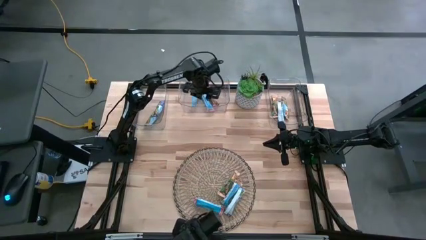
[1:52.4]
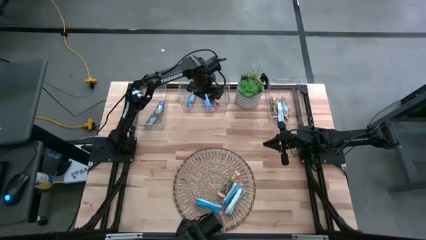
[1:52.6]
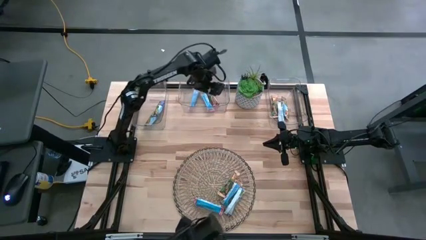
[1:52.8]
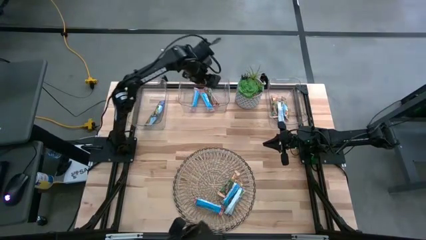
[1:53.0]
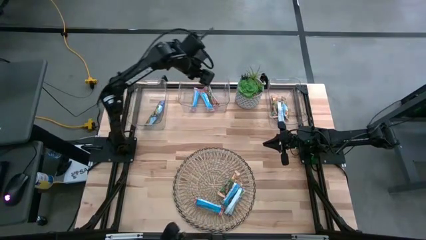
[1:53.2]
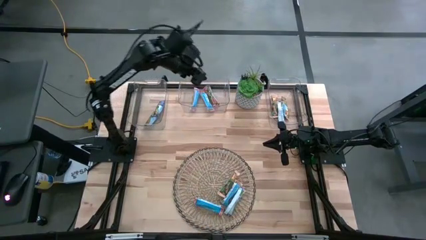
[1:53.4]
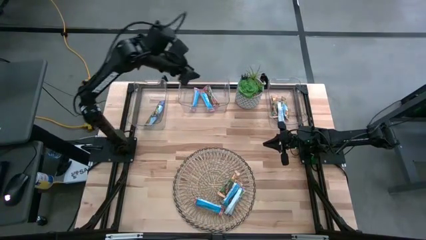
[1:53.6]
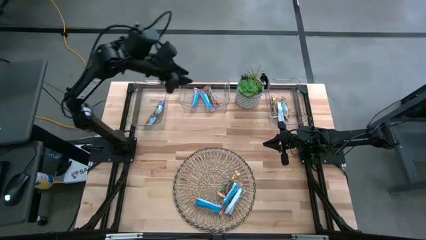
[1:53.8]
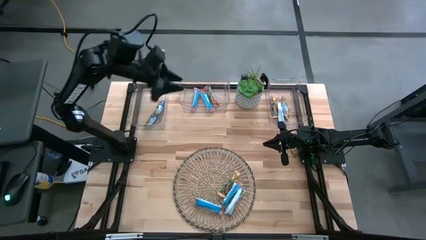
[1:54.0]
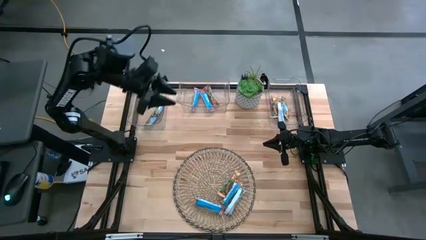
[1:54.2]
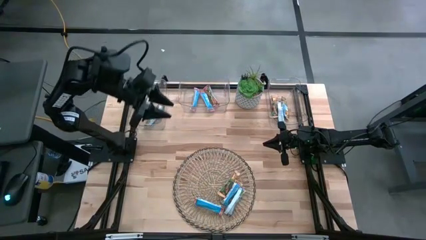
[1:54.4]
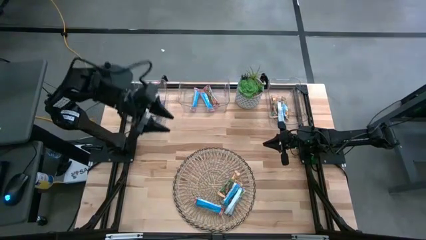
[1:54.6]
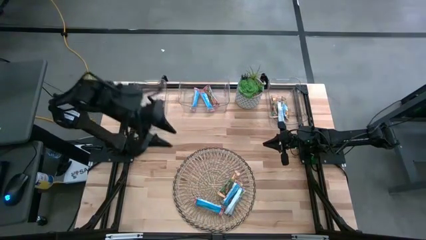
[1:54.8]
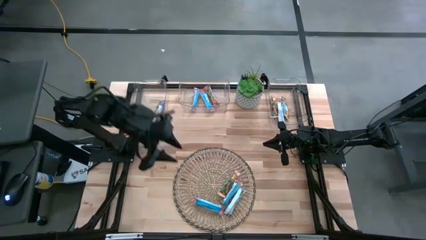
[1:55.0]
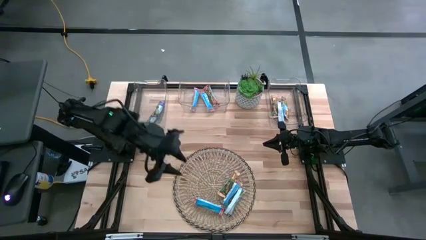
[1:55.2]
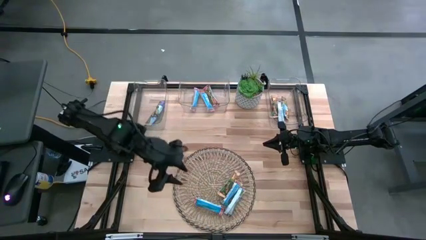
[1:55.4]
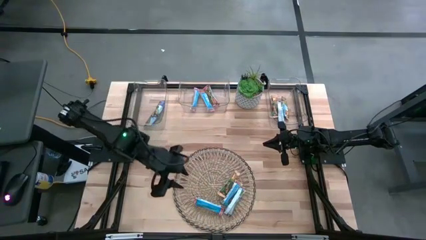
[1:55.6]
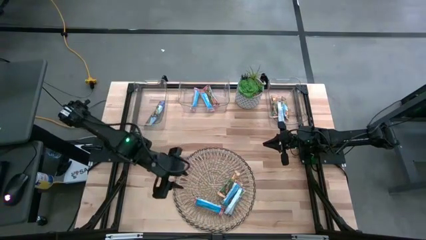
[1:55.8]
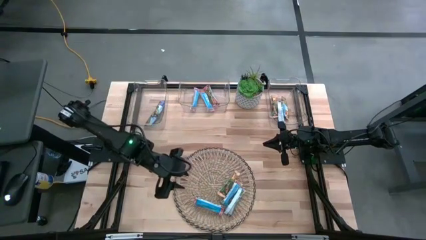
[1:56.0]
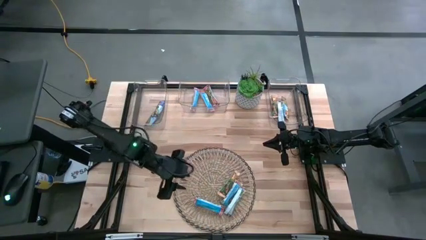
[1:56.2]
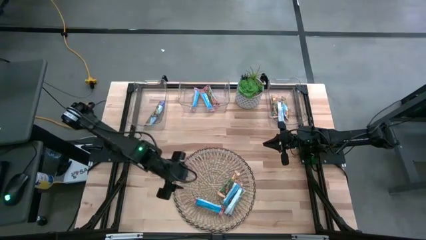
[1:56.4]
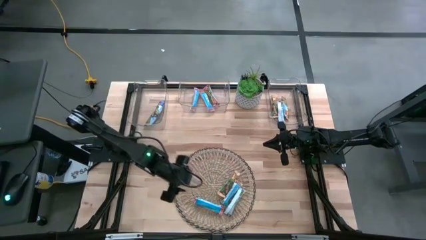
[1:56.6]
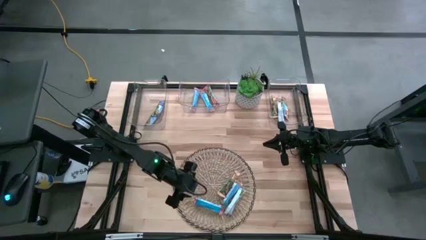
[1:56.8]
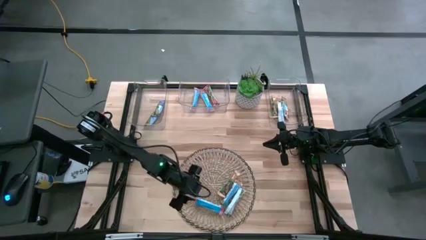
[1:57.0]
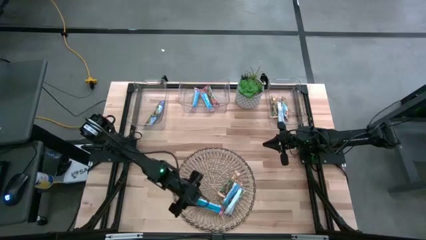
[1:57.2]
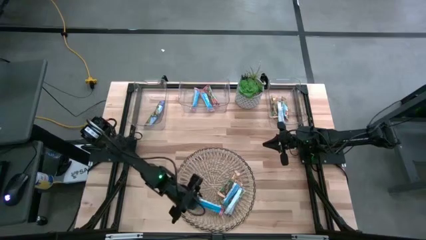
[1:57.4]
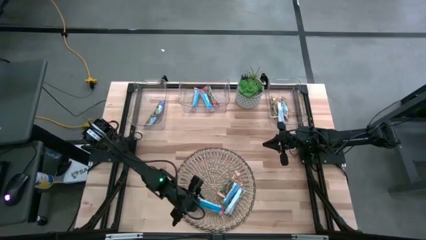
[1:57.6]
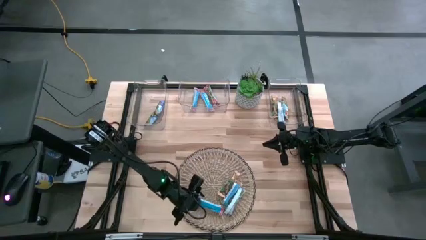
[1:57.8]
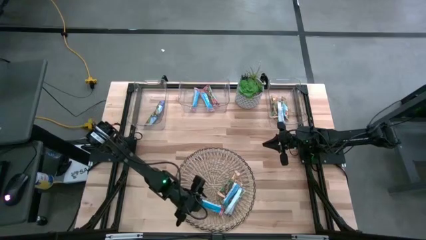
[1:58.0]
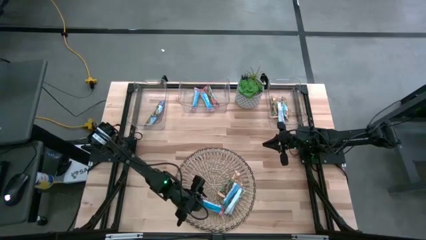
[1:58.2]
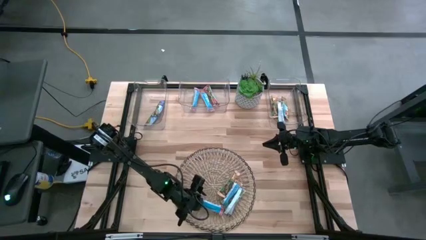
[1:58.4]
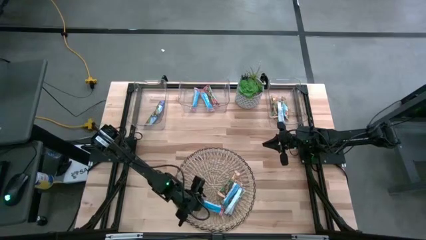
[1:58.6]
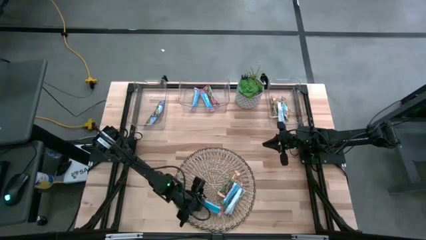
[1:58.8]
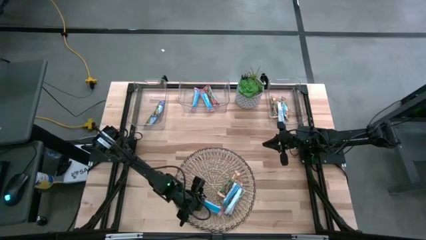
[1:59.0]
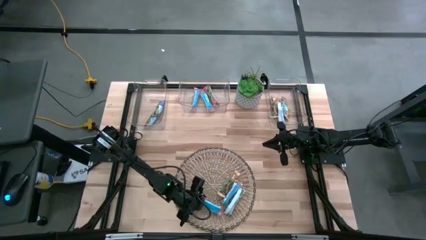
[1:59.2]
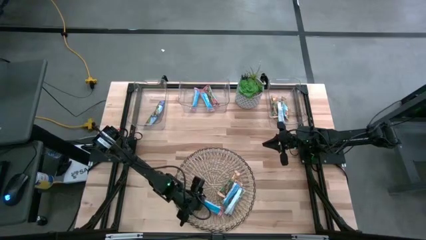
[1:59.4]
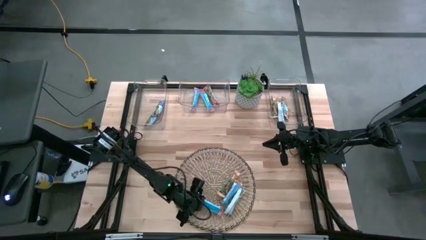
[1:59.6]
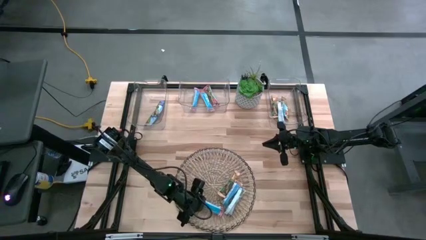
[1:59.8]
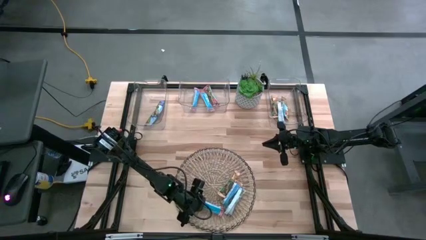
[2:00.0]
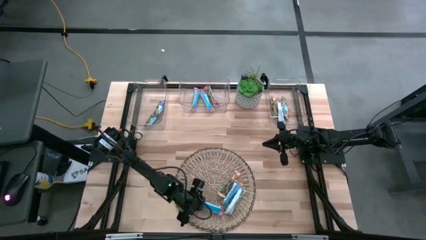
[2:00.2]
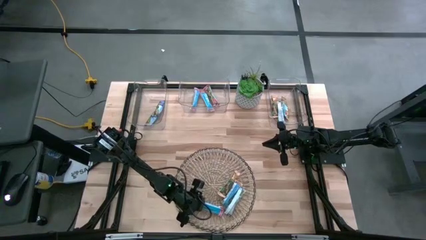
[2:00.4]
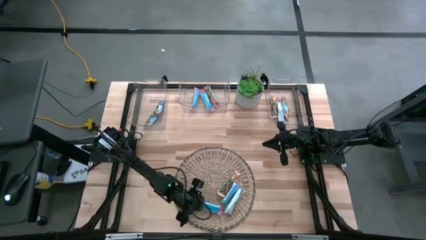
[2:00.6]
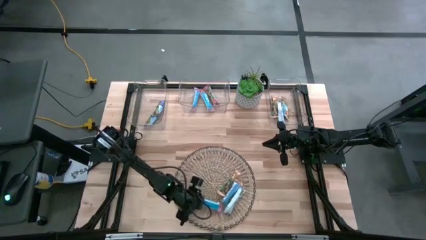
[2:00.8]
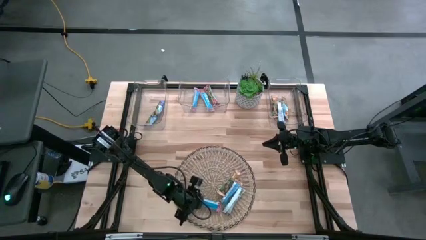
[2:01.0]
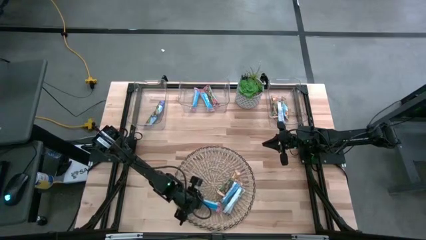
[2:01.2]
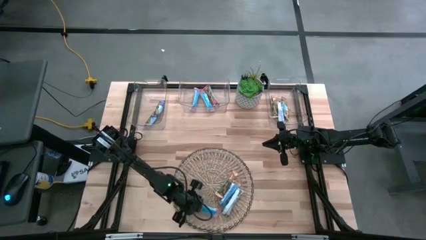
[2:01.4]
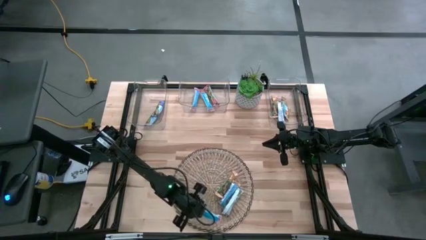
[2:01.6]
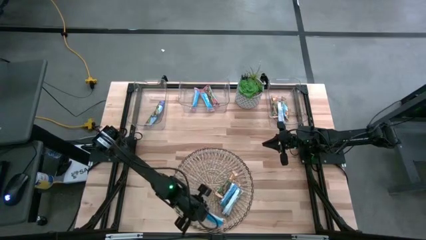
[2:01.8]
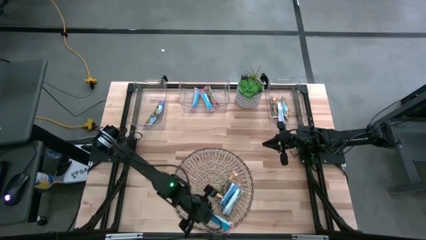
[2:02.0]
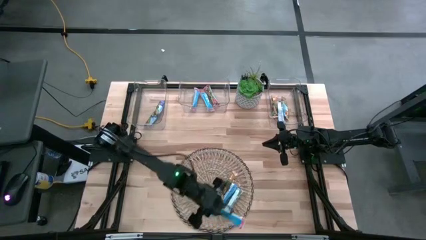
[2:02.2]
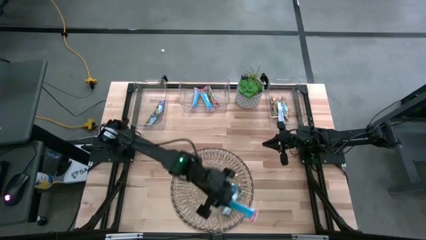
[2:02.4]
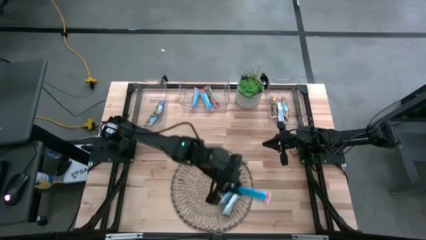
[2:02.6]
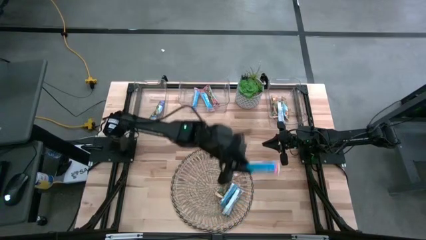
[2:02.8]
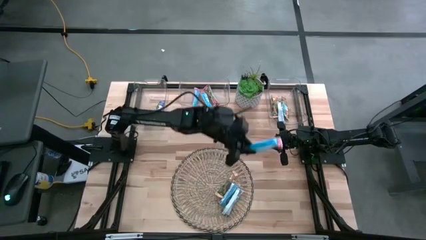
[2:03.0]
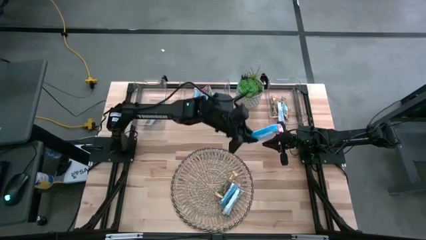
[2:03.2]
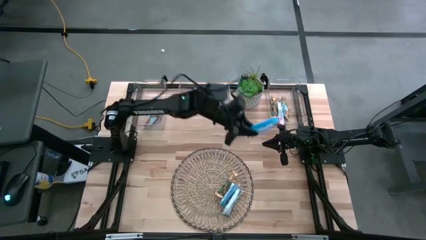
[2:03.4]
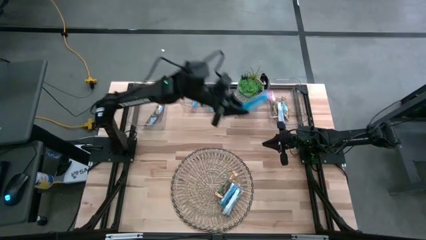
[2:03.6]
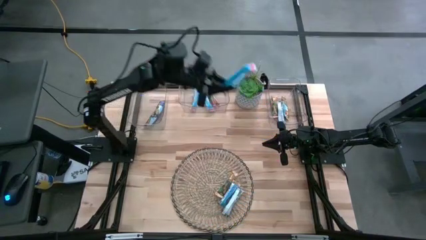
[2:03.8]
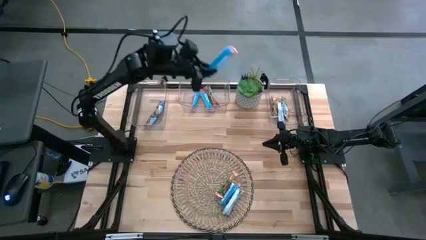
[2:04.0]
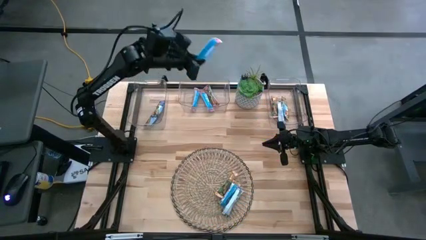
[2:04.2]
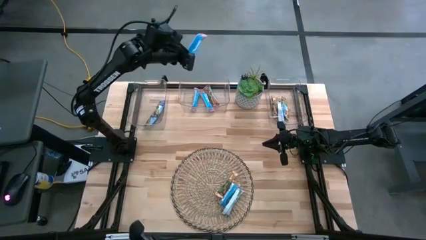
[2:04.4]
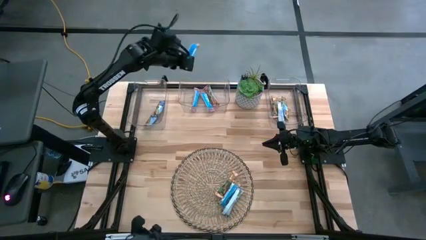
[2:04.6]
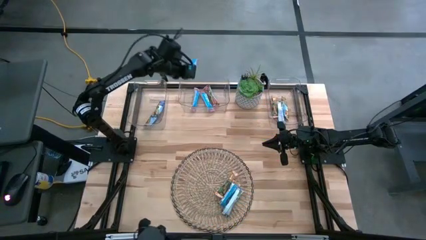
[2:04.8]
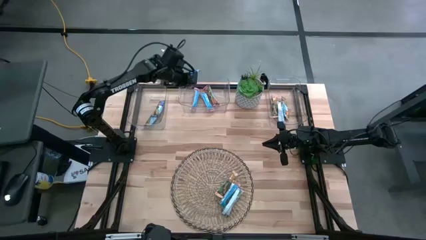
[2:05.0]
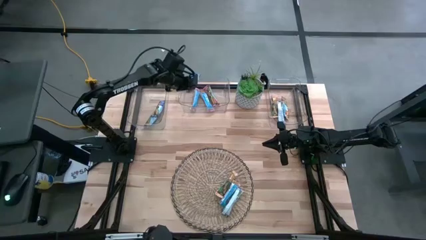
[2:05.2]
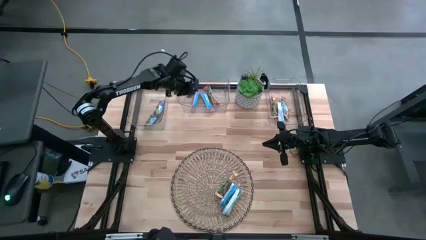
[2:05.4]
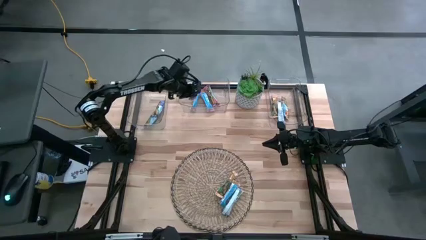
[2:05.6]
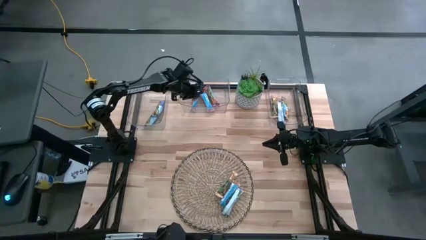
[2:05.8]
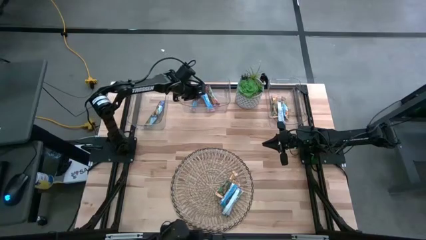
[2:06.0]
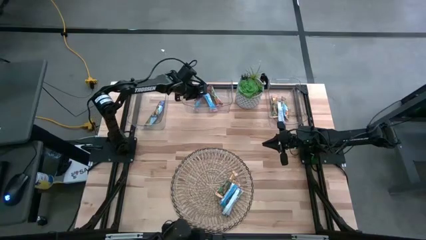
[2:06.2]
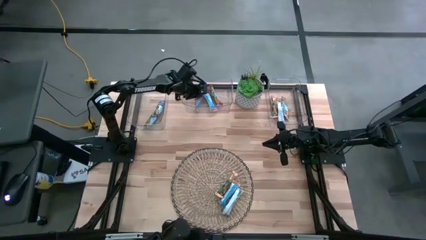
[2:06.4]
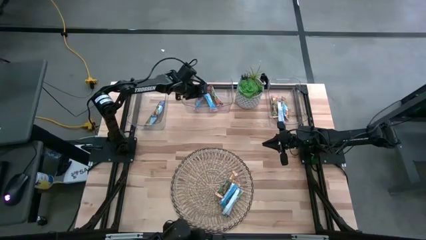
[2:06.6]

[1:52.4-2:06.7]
Task: Pick and place Granola Bars by type
Put the red granola bar into the middle transparent bin
